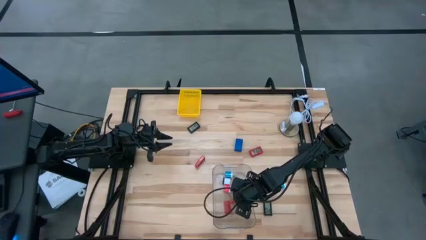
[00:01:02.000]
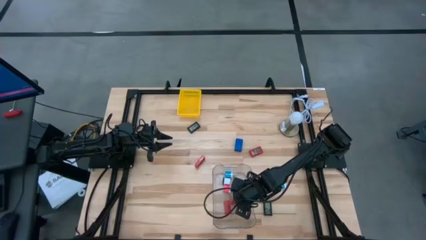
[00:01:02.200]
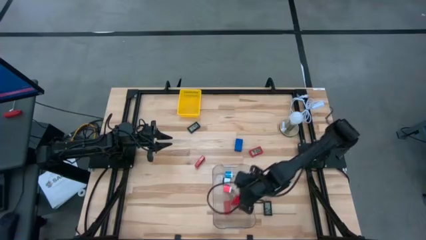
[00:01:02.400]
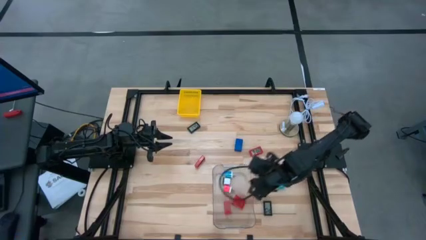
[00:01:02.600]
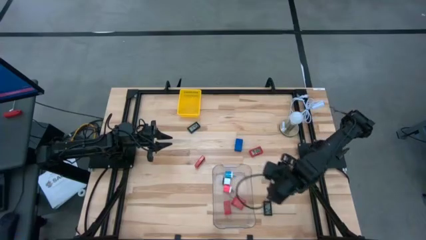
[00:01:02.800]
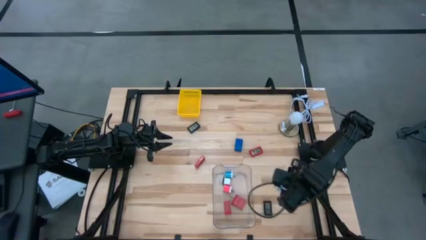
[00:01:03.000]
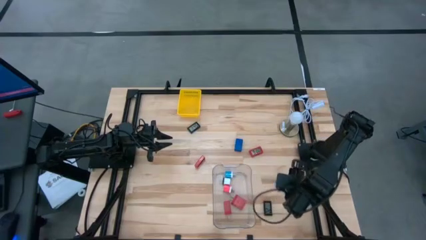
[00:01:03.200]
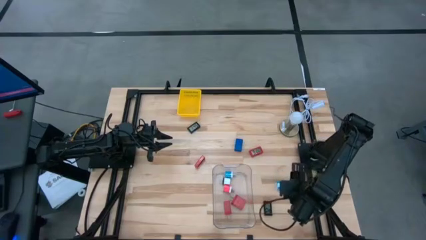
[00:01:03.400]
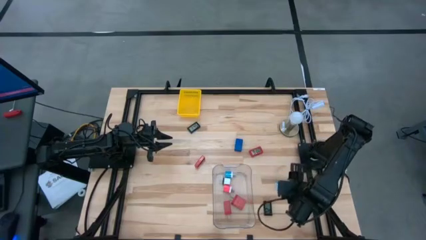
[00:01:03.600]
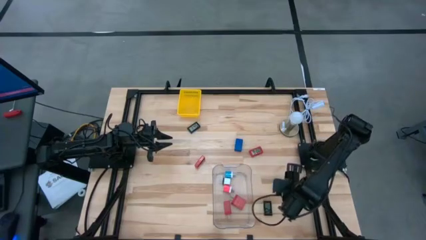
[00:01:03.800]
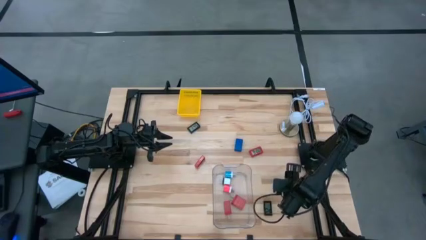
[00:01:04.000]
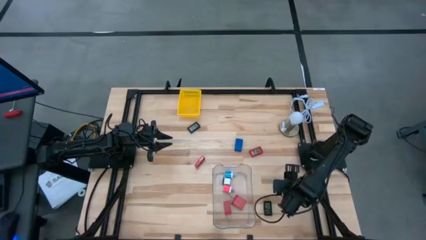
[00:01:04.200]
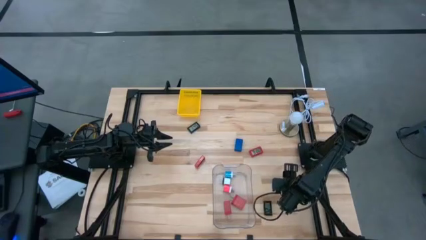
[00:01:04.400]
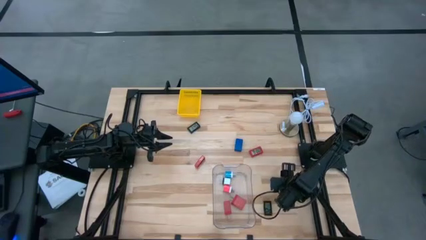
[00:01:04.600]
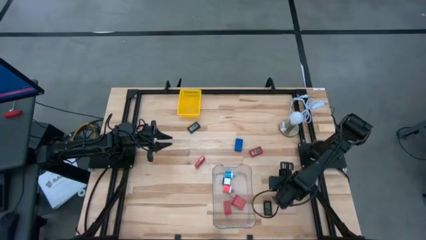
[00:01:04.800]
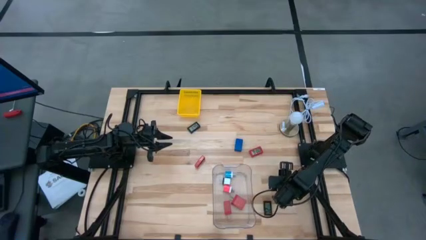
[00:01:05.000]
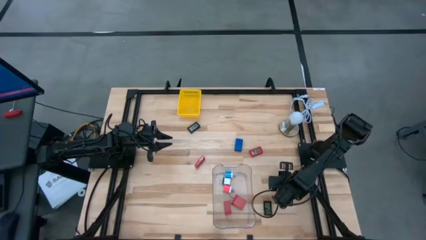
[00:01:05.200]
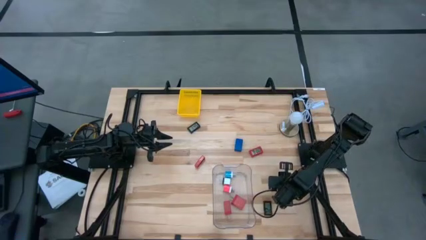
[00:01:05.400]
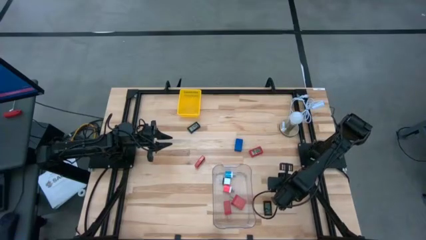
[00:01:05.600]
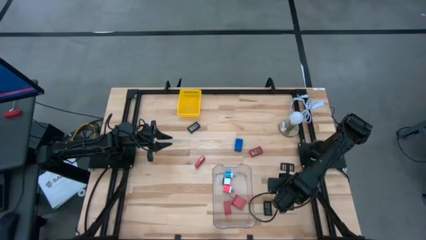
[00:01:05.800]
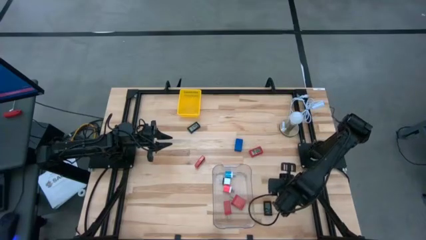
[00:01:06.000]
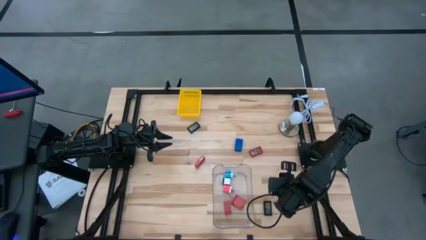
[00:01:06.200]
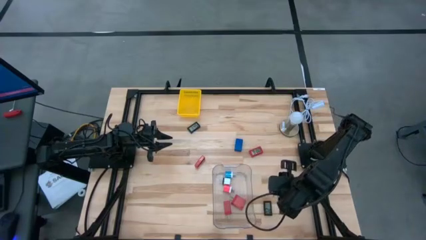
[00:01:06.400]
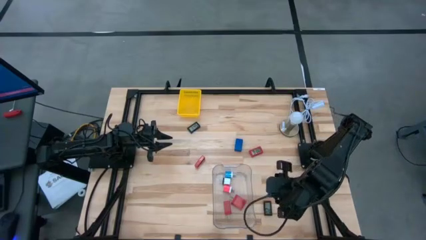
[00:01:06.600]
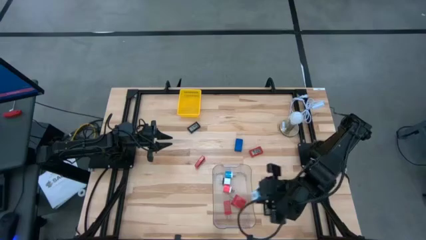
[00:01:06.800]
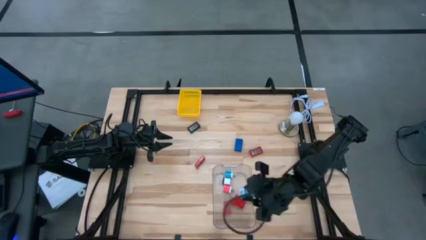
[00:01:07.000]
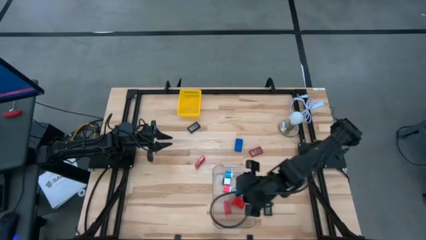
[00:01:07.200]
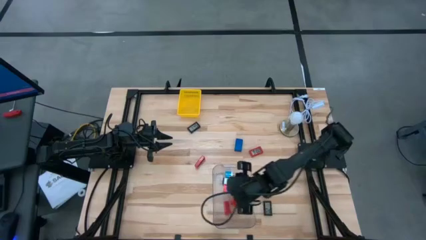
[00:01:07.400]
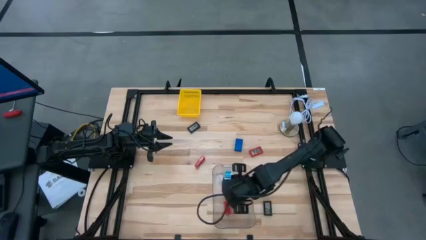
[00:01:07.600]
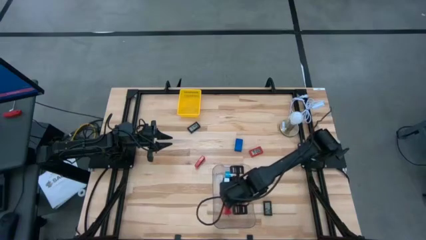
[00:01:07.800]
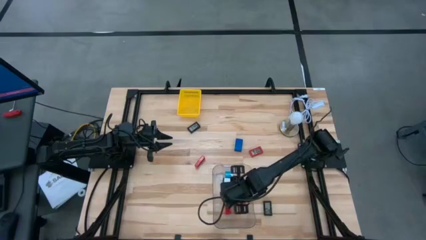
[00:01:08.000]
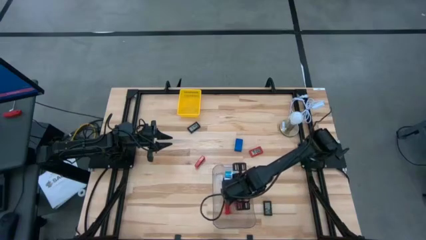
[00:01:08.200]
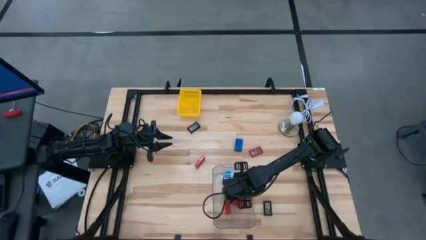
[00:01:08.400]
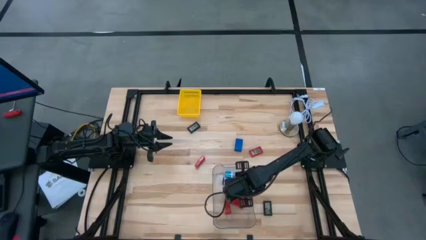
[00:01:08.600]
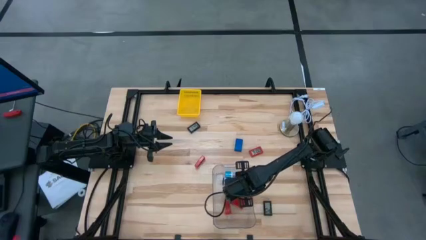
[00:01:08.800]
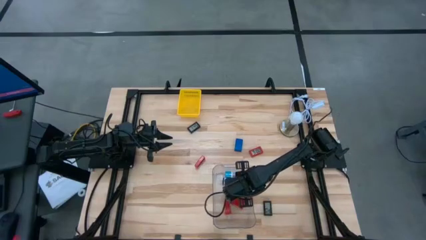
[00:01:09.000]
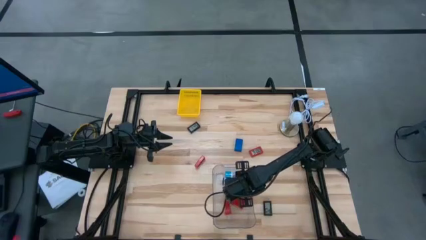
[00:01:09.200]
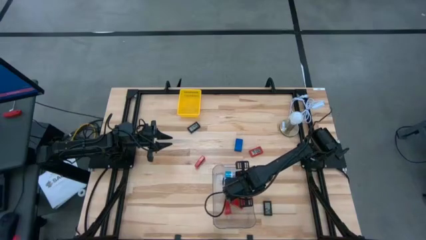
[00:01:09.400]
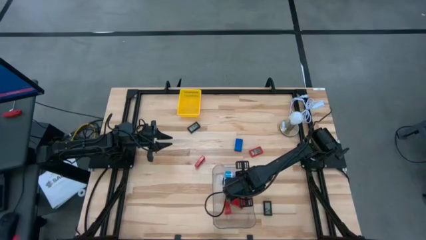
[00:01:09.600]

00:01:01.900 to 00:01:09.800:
Task: Pick & Place Office items
Put the light blue power adaptor into the clear bin

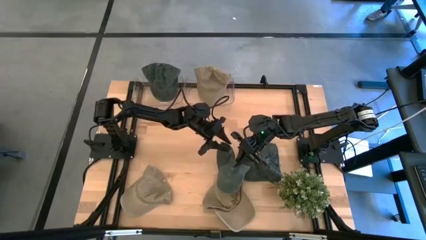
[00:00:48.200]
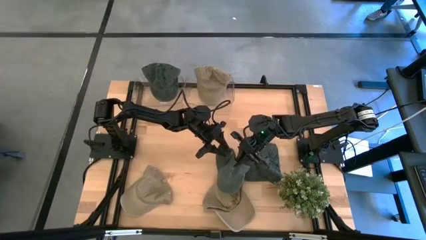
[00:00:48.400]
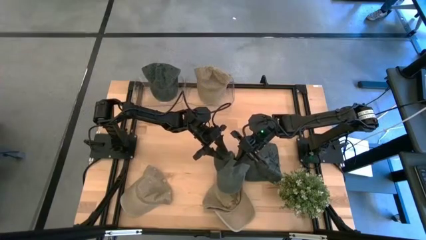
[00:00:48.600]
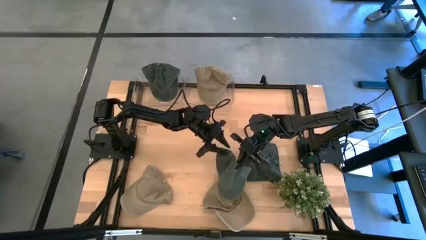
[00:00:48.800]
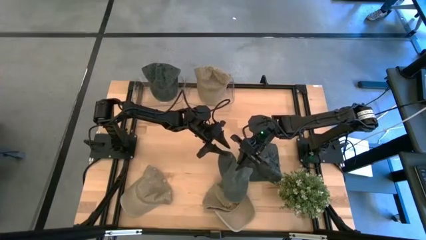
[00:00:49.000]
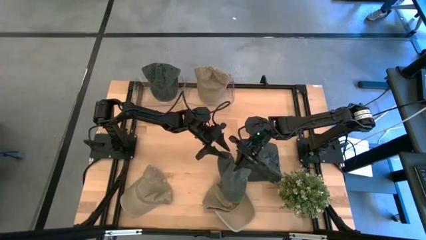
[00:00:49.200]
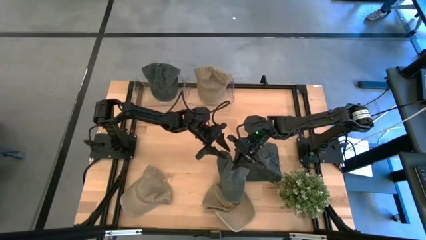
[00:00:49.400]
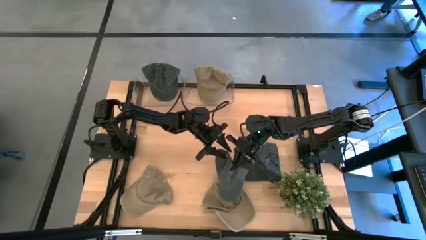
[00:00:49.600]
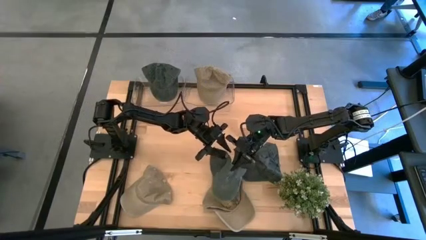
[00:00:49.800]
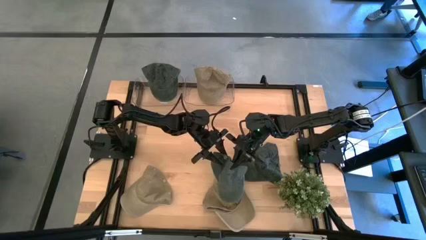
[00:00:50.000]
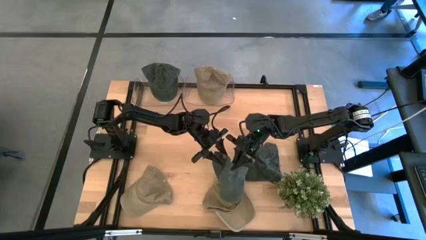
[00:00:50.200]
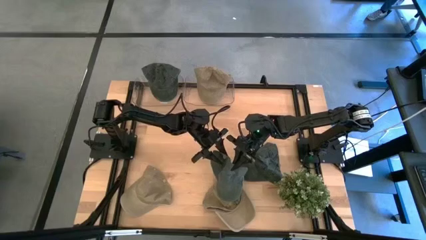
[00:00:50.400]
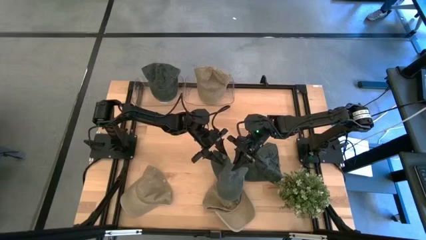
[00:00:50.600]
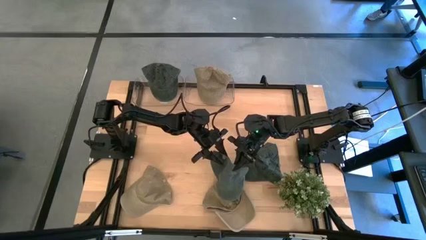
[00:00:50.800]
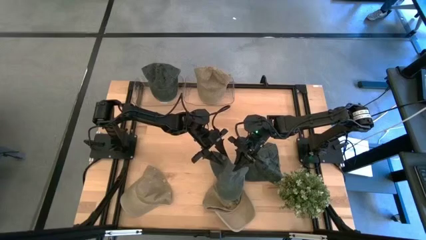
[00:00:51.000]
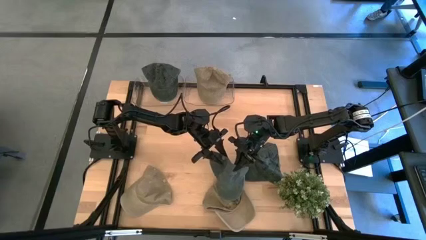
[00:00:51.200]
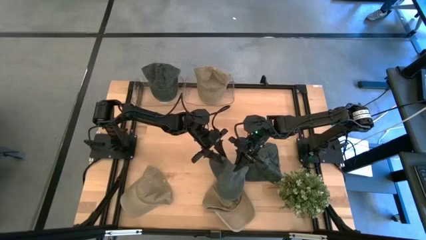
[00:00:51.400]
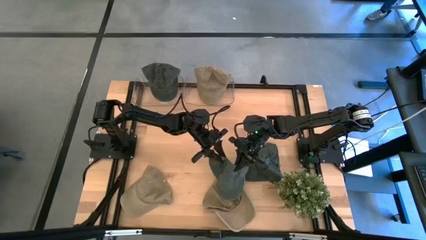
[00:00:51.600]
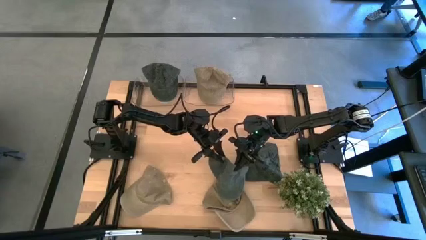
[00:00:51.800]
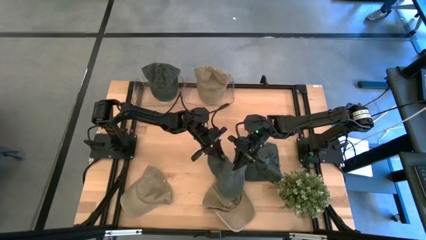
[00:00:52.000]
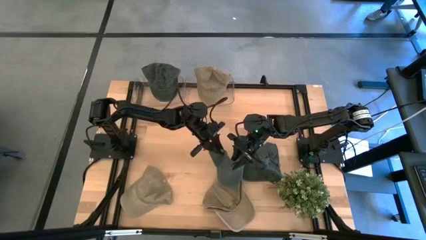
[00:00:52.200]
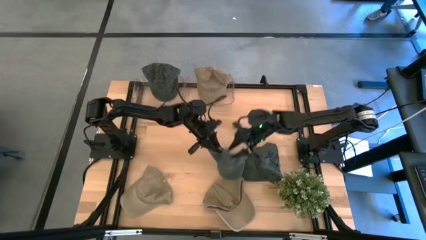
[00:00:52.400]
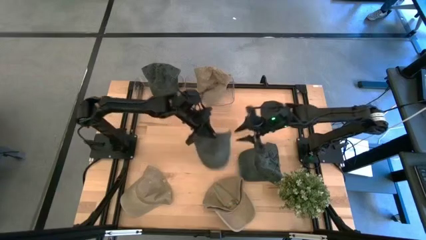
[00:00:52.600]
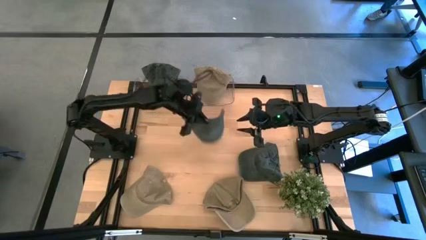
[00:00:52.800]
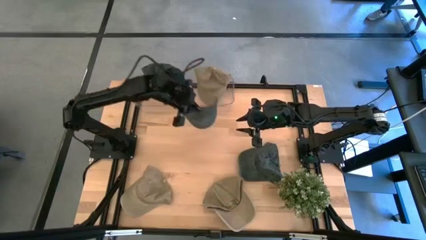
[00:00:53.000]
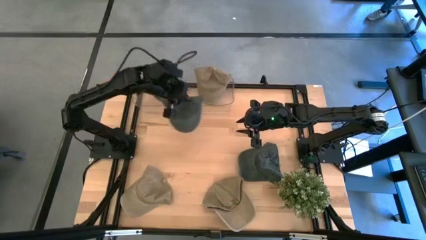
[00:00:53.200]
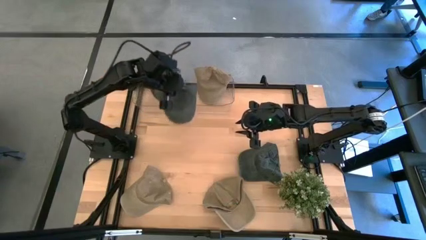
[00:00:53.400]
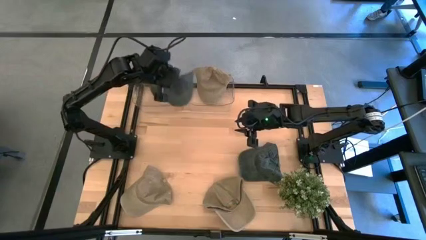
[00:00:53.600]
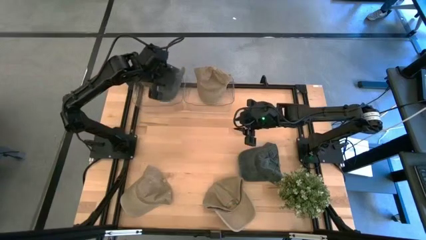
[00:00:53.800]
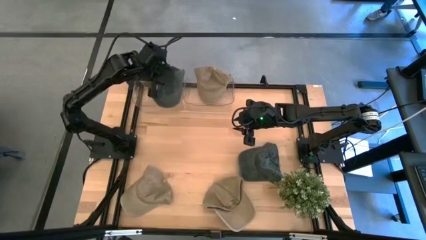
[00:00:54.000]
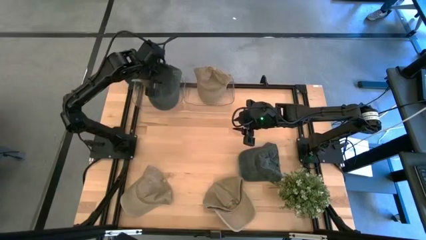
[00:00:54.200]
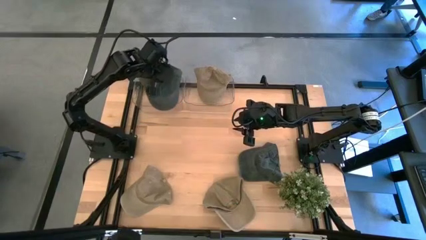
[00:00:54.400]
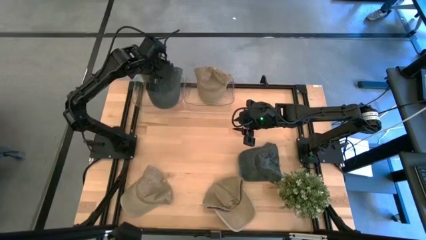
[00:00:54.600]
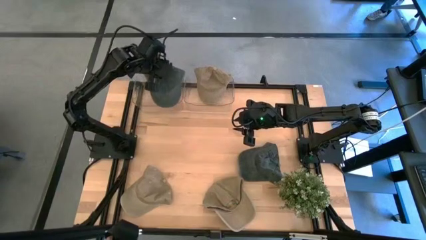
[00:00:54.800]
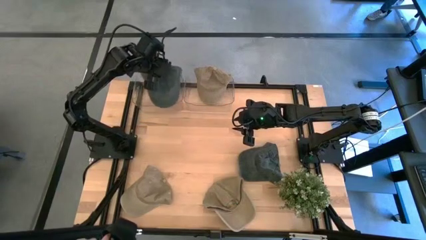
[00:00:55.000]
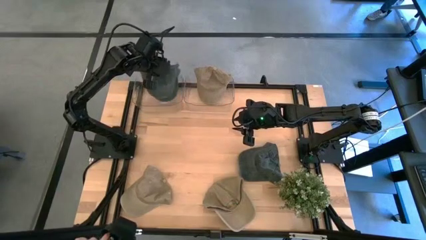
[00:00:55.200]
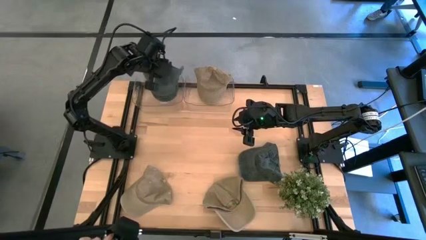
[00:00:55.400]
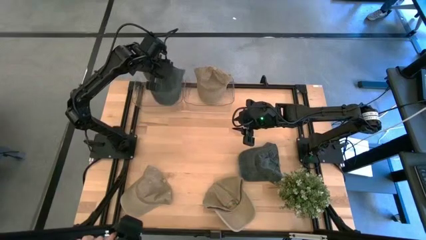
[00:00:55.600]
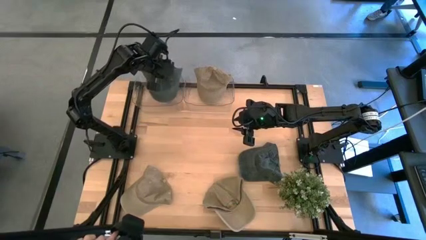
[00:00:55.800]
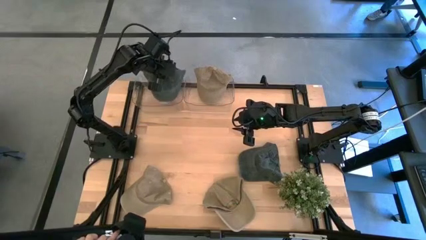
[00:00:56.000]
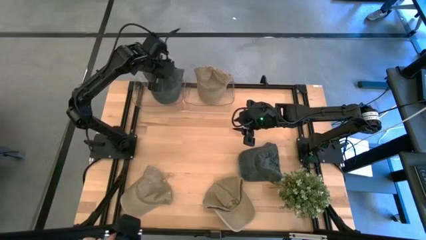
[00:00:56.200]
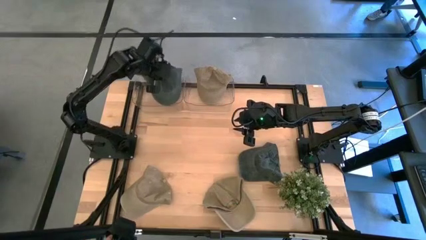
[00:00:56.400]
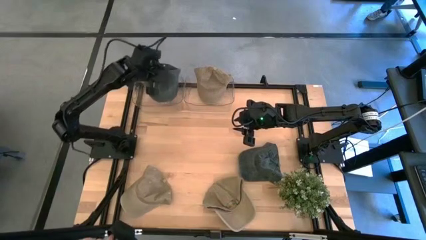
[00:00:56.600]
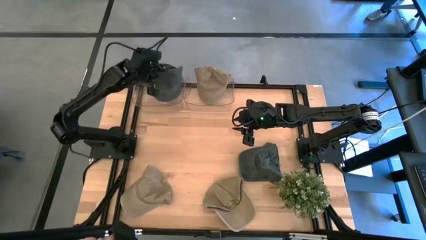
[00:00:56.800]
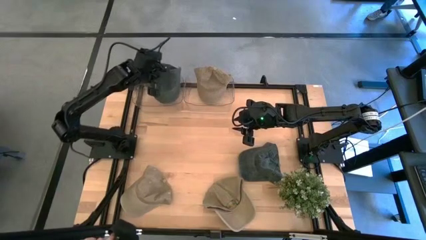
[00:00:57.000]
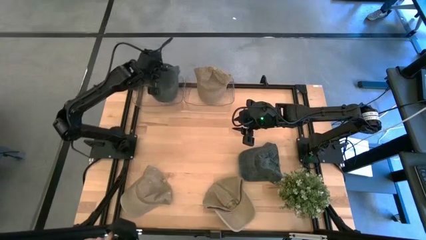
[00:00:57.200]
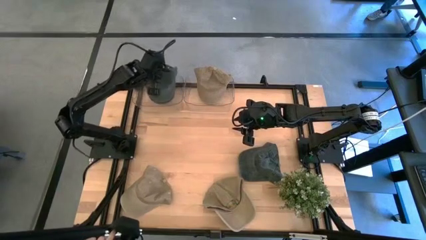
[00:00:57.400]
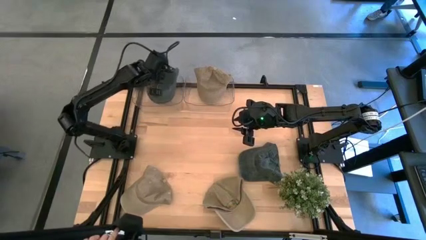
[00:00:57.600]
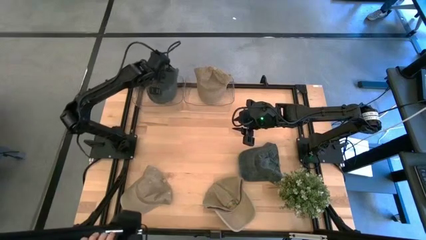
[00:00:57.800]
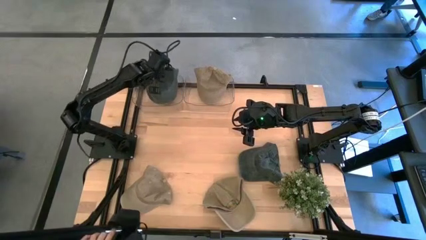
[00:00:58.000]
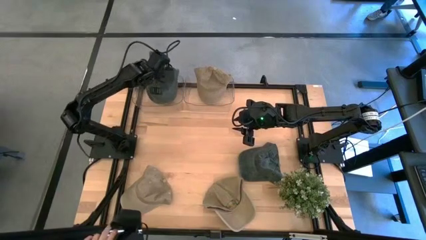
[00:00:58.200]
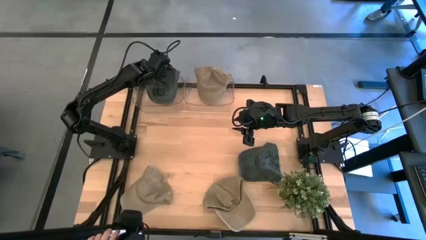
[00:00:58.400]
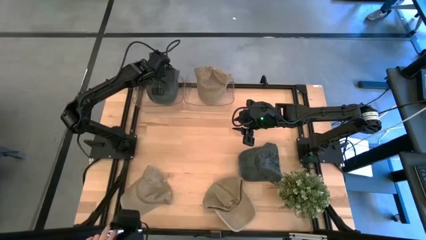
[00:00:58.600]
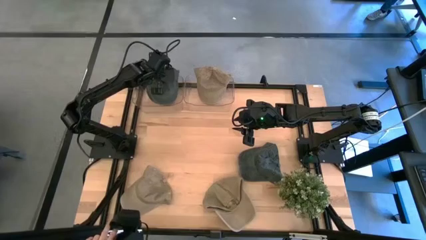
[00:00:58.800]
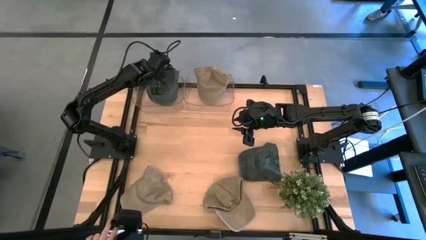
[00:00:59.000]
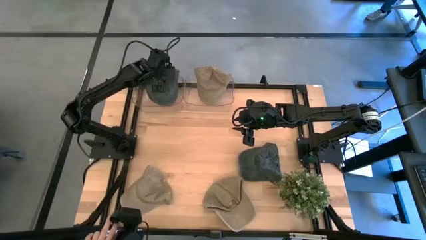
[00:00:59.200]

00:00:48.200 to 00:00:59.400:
Task: Pick & Place hat
Put the left blue cap into the left transparent bin
